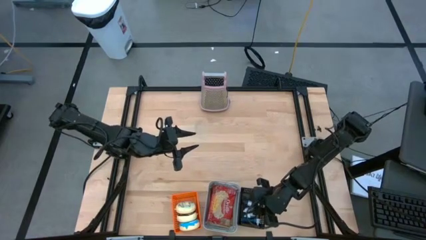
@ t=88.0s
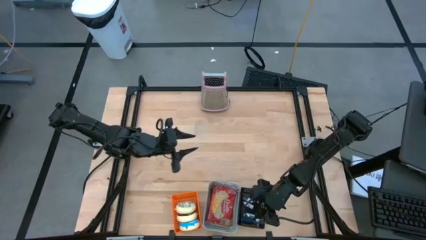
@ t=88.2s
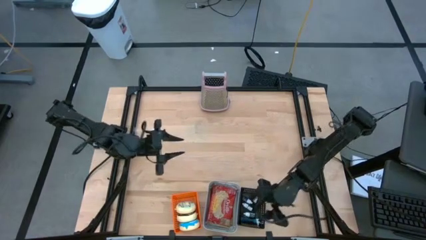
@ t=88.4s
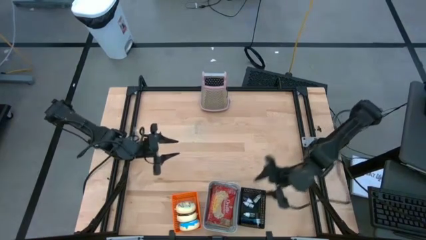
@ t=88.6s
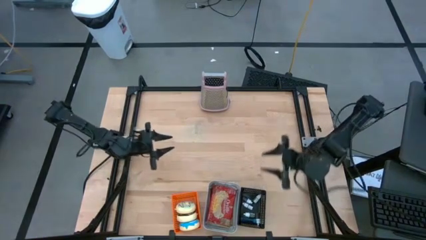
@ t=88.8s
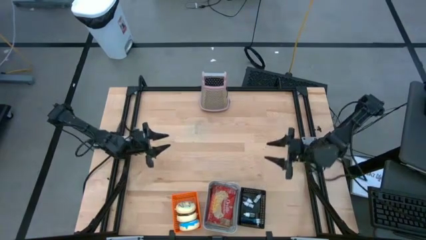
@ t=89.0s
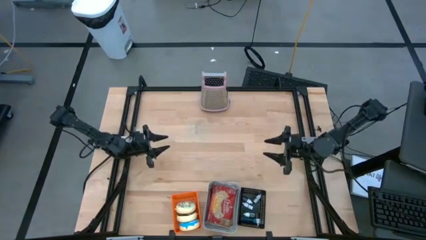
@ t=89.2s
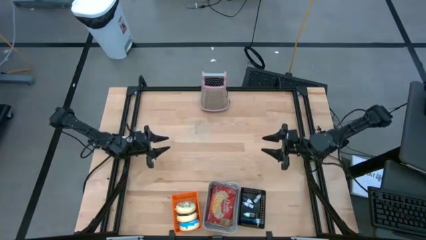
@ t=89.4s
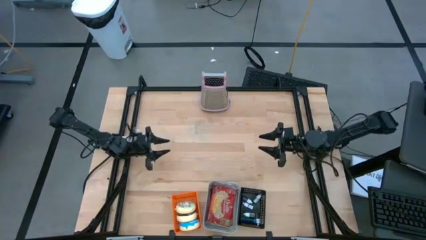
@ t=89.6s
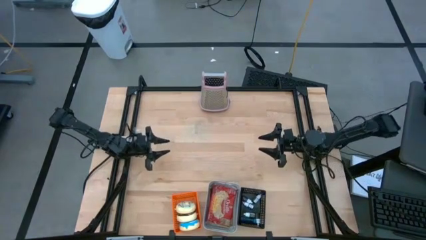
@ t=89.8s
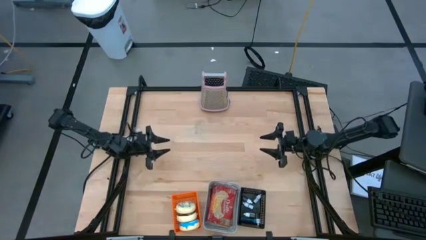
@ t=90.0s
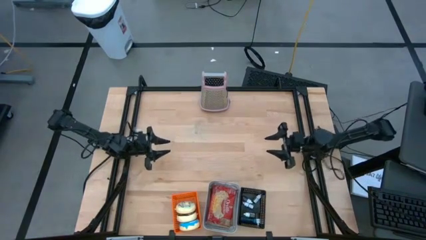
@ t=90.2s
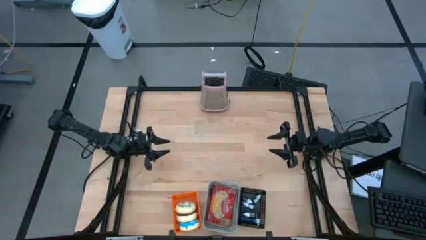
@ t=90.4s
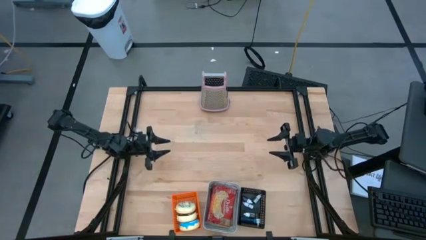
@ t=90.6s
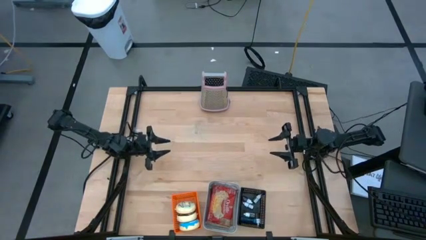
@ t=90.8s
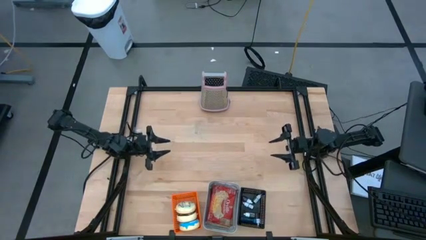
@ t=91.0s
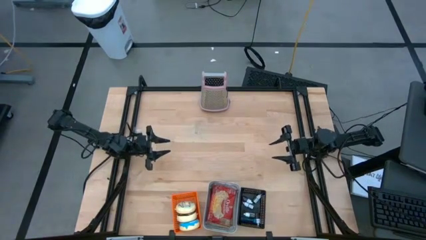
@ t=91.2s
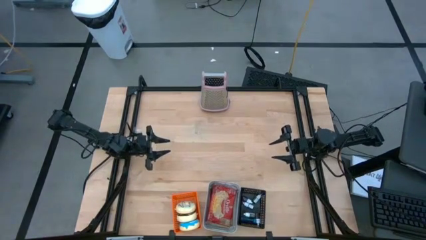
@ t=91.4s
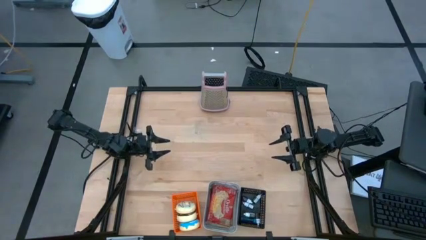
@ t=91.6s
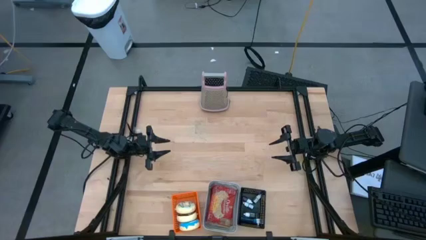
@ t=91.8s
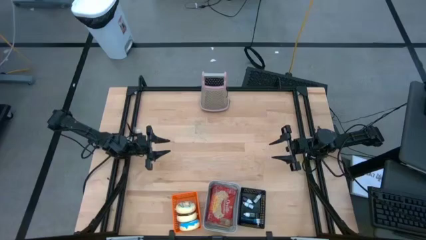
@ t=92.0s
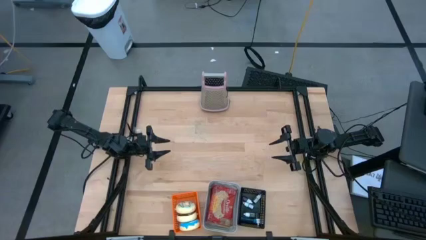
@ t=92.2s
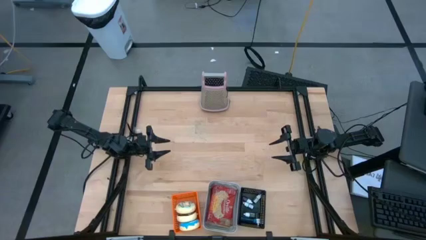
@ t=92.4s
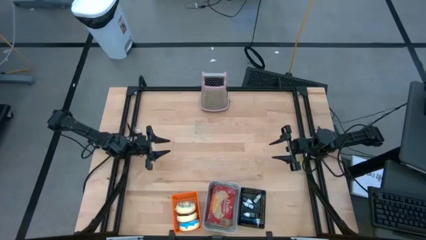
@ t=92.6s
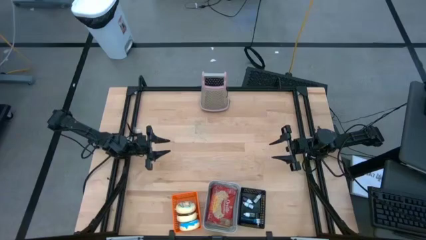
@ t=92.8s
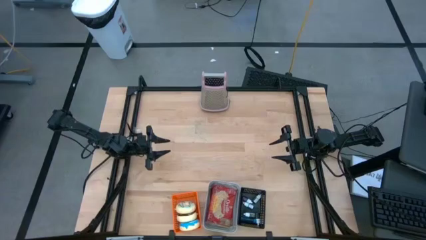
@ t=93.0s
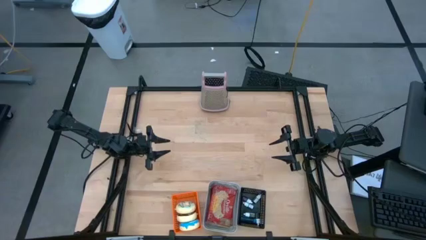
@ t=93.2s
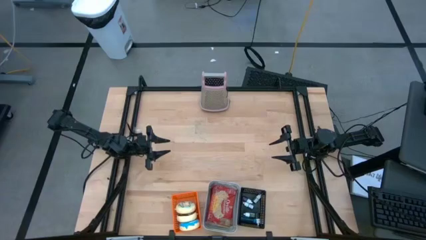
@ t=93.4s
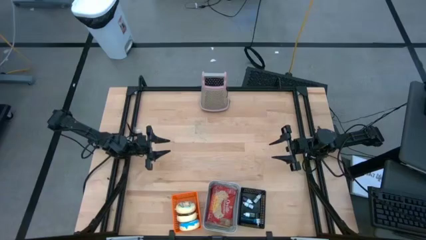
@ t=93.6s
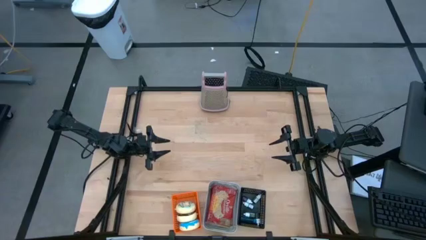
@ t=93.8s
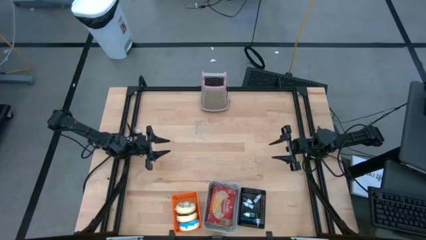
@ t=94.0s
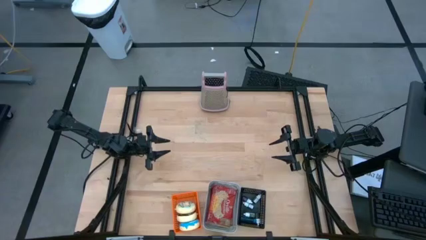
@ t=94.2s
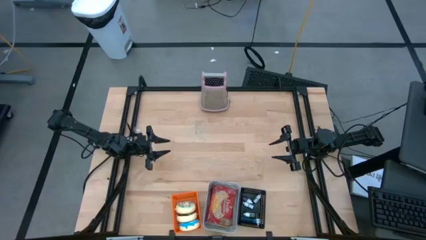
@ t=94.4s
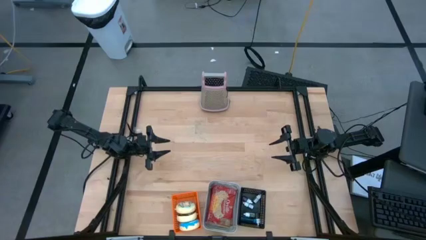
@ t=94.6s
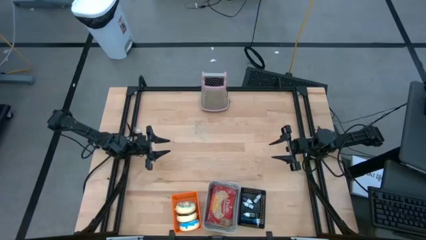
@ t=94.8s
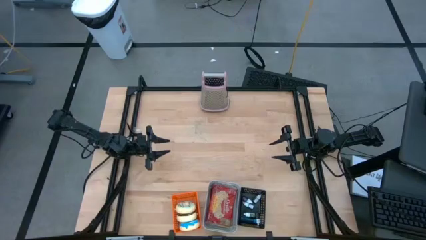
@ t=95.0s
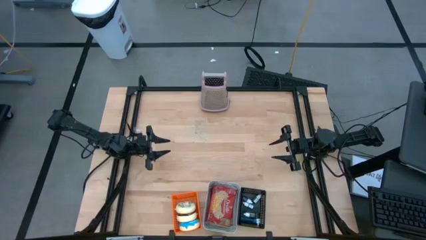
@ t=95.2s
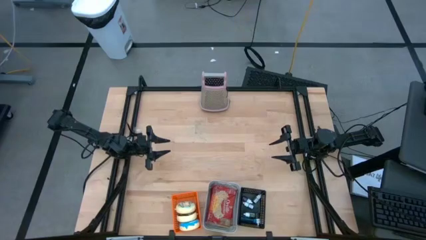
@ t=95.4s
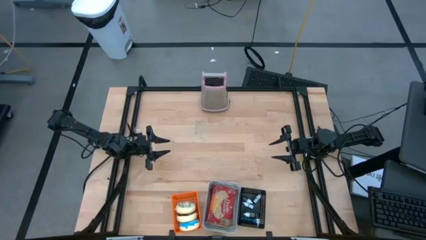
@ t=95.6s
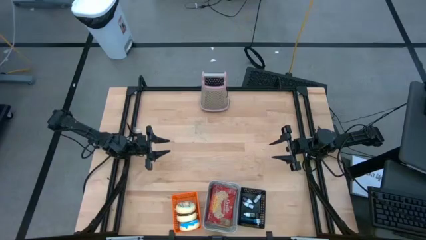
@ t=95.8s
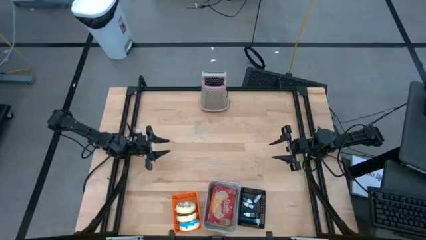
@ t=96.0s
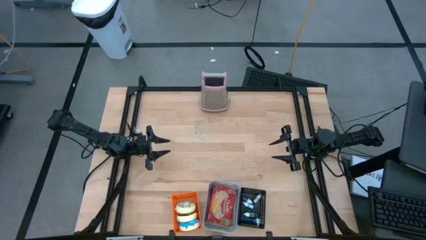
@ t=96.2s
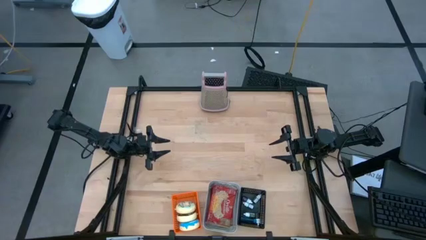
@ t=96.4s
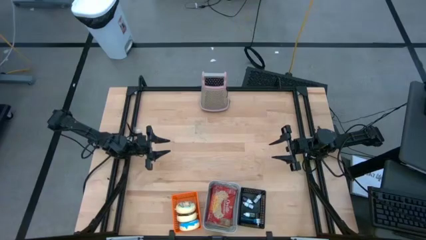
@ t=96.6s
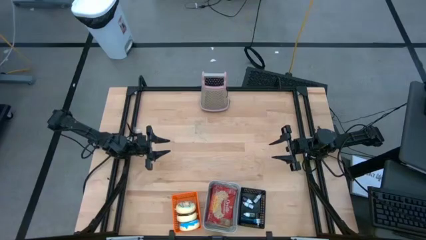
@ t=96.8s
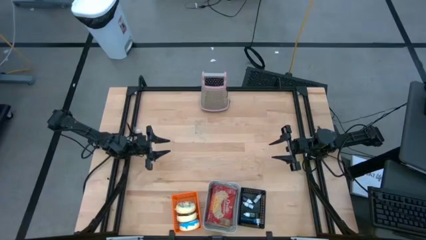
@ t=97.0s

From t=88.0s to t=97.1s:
Return to Home Position
